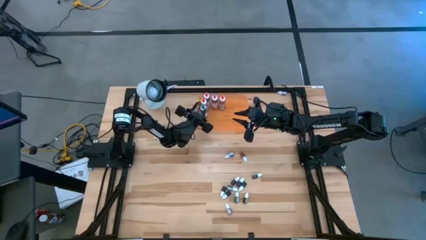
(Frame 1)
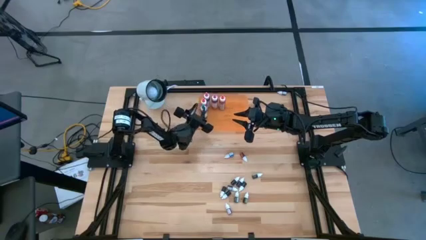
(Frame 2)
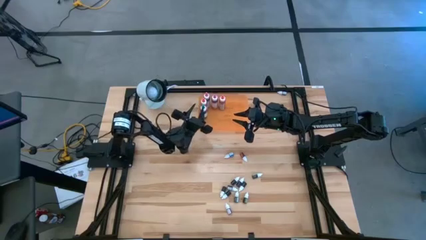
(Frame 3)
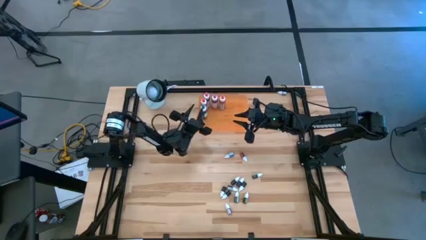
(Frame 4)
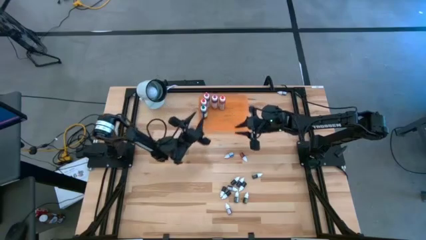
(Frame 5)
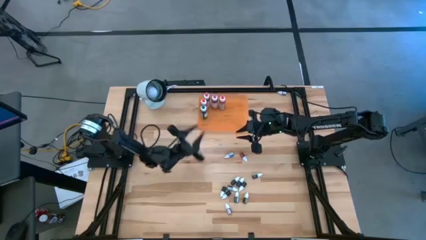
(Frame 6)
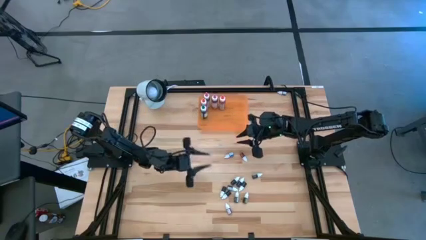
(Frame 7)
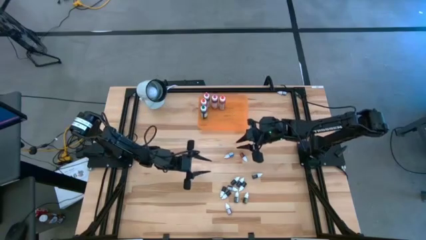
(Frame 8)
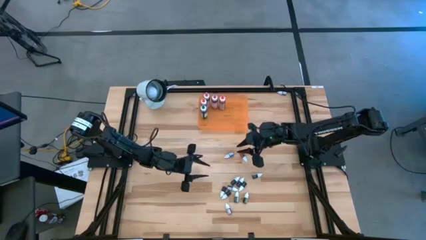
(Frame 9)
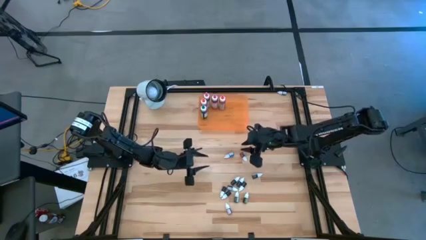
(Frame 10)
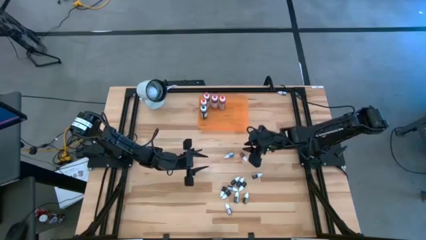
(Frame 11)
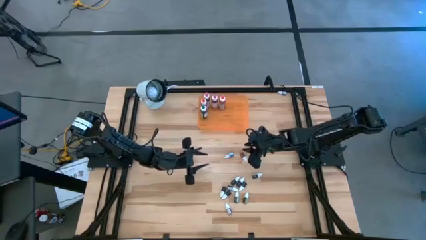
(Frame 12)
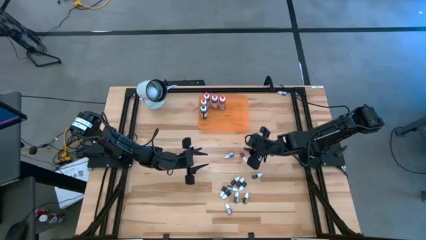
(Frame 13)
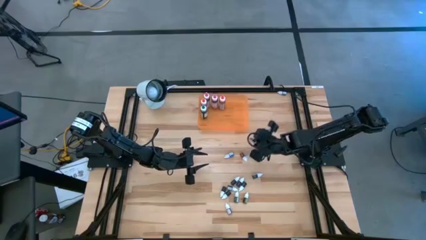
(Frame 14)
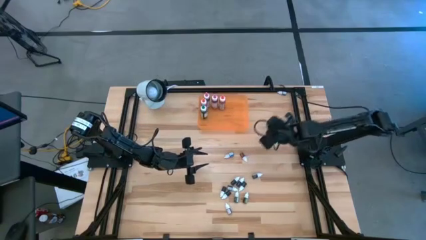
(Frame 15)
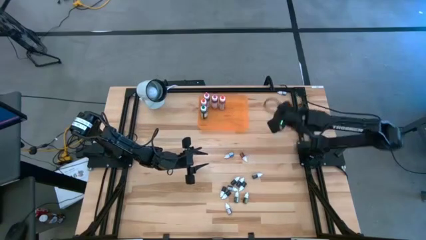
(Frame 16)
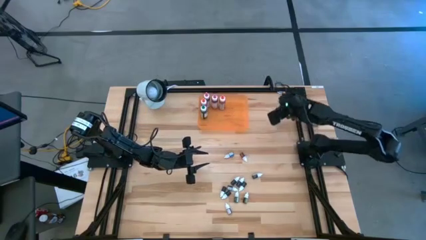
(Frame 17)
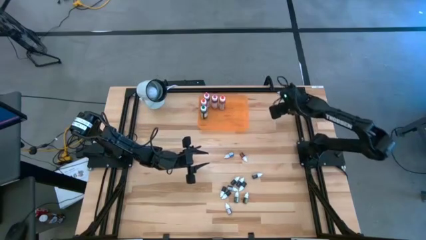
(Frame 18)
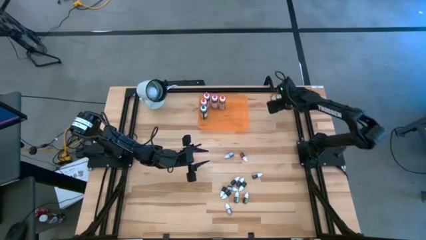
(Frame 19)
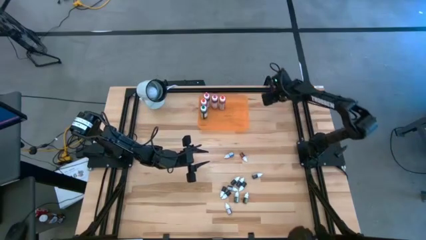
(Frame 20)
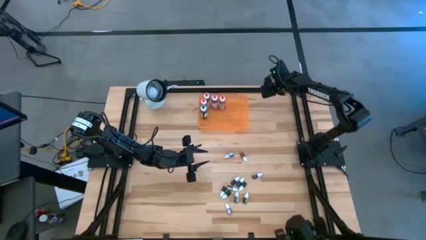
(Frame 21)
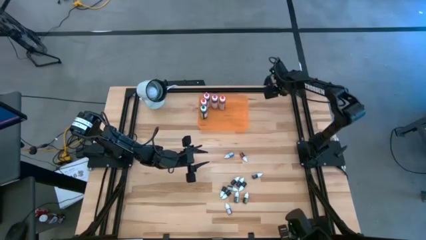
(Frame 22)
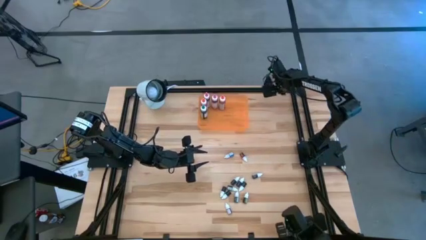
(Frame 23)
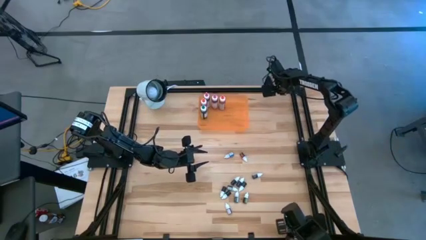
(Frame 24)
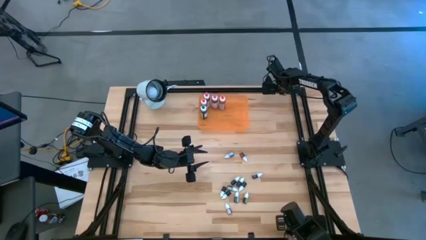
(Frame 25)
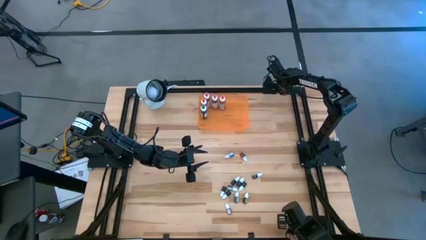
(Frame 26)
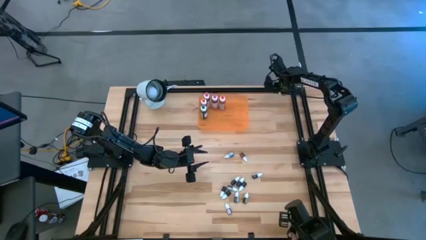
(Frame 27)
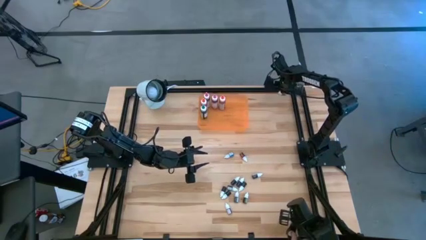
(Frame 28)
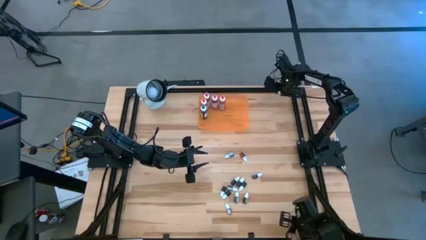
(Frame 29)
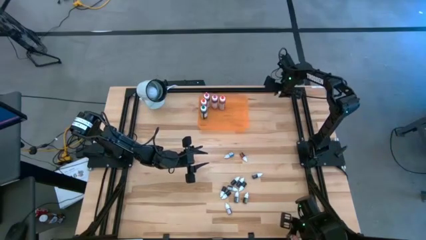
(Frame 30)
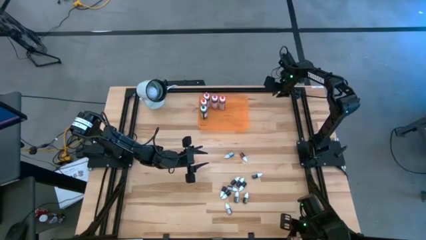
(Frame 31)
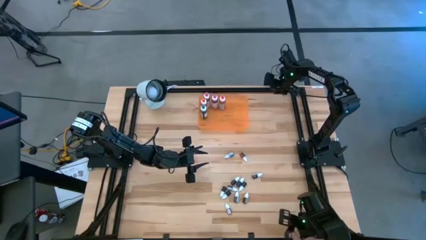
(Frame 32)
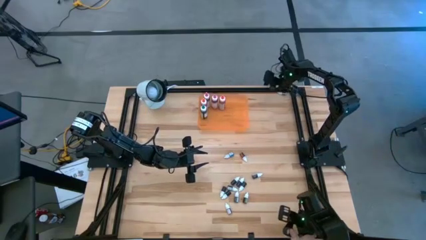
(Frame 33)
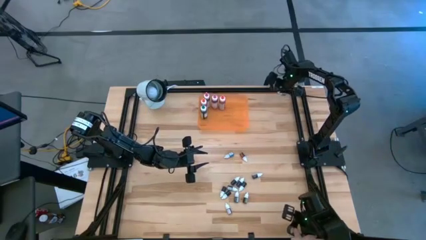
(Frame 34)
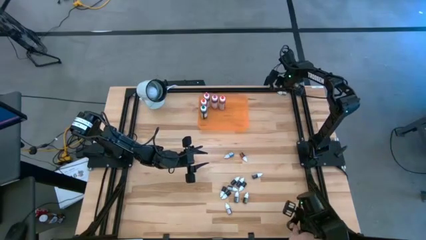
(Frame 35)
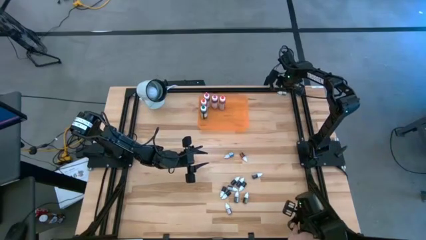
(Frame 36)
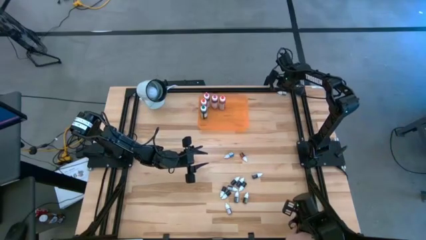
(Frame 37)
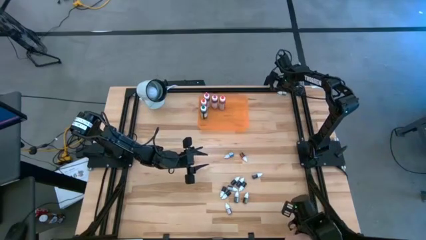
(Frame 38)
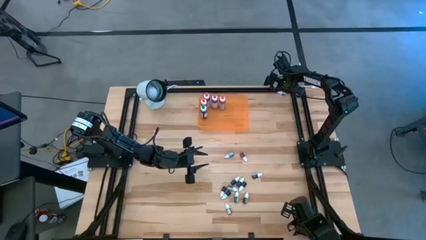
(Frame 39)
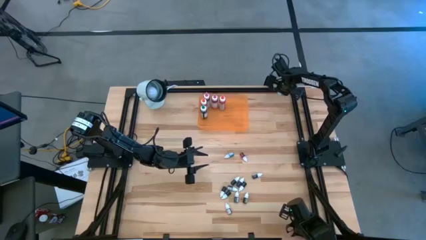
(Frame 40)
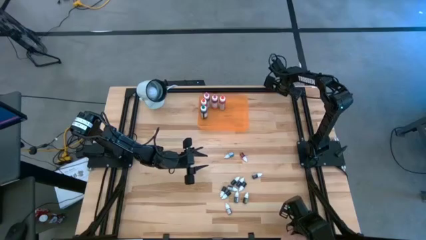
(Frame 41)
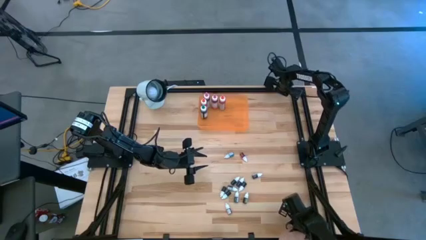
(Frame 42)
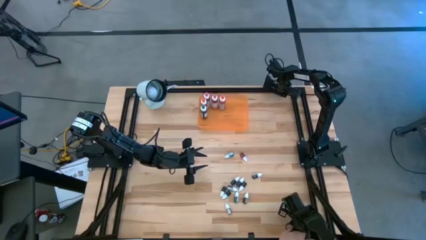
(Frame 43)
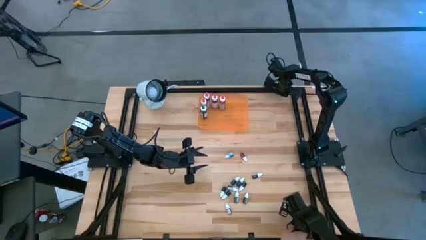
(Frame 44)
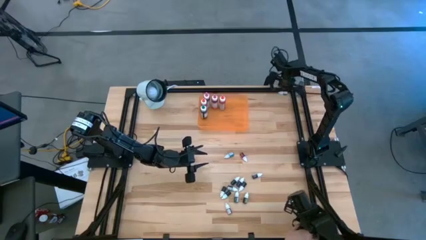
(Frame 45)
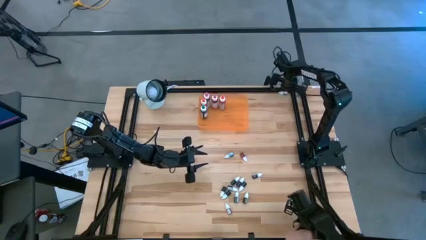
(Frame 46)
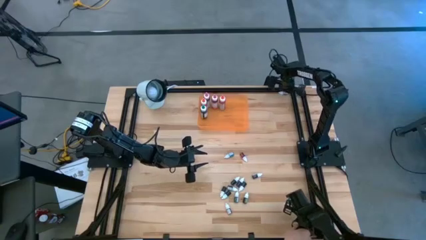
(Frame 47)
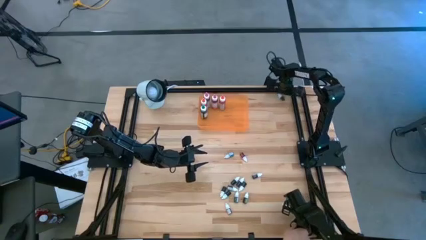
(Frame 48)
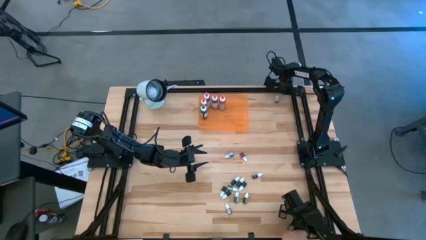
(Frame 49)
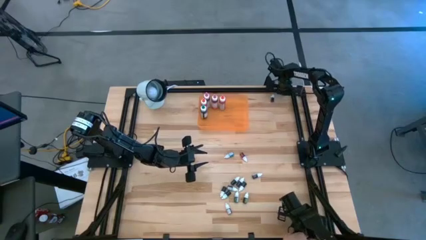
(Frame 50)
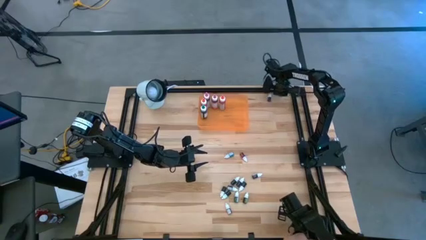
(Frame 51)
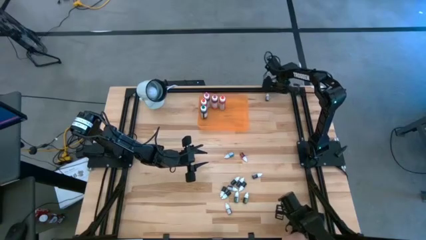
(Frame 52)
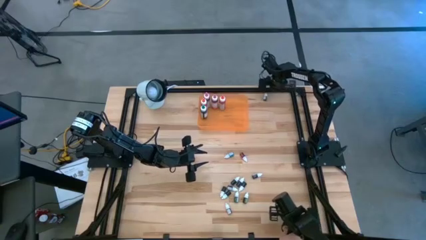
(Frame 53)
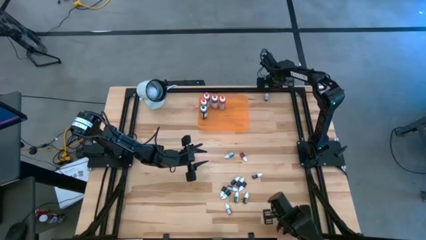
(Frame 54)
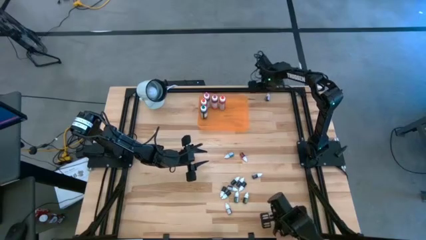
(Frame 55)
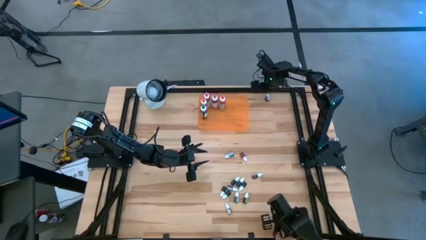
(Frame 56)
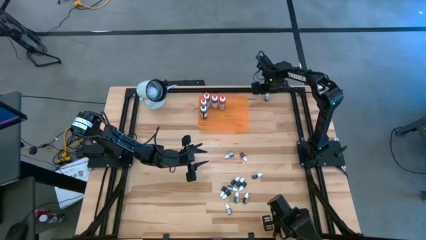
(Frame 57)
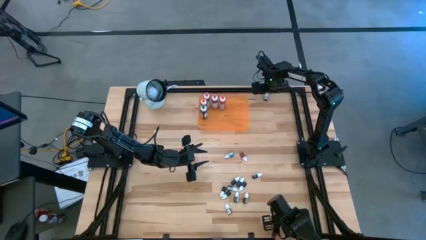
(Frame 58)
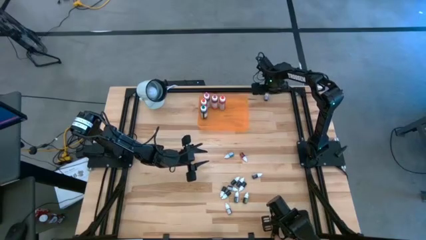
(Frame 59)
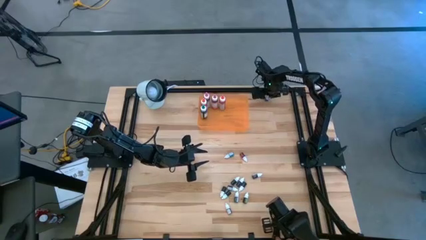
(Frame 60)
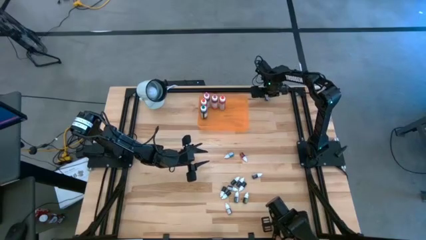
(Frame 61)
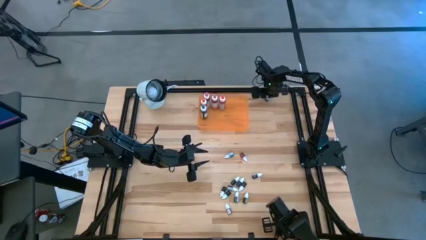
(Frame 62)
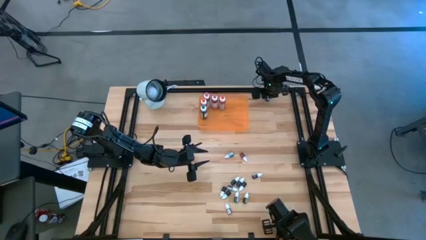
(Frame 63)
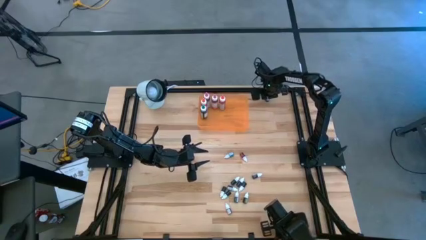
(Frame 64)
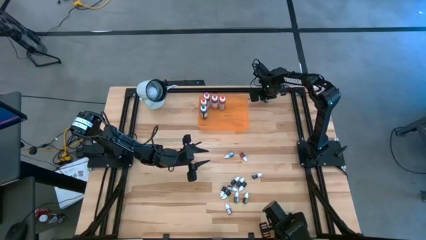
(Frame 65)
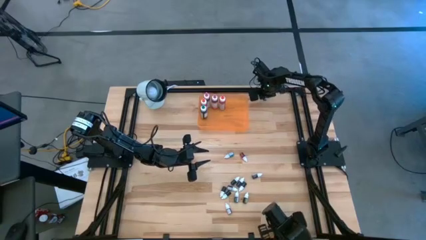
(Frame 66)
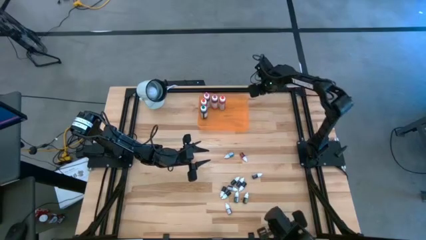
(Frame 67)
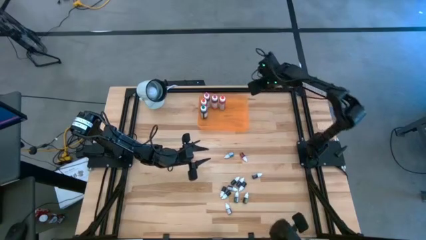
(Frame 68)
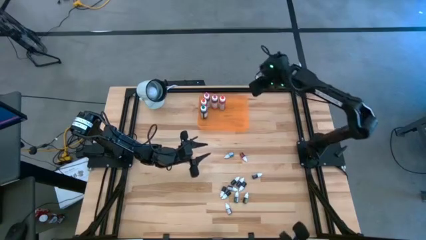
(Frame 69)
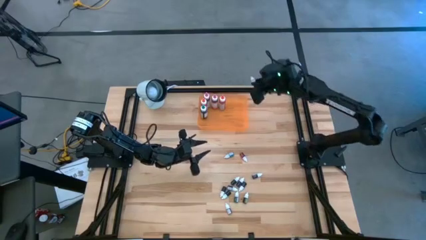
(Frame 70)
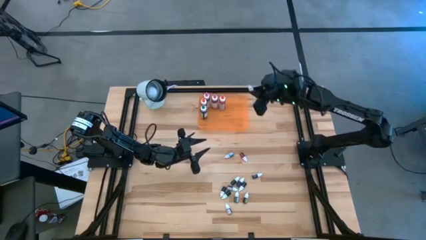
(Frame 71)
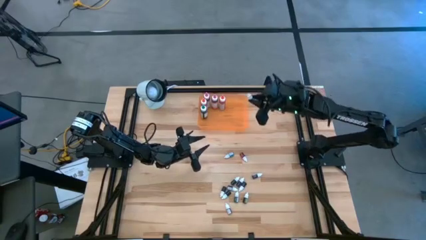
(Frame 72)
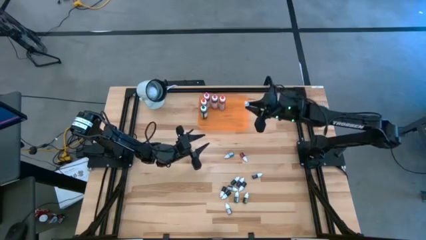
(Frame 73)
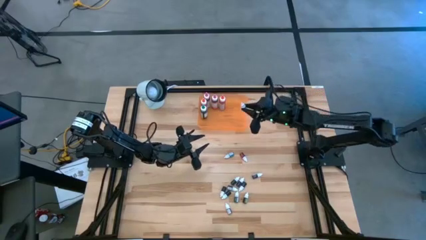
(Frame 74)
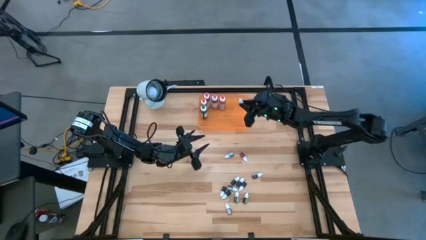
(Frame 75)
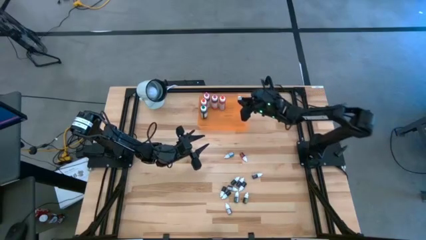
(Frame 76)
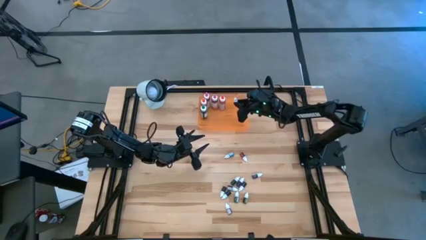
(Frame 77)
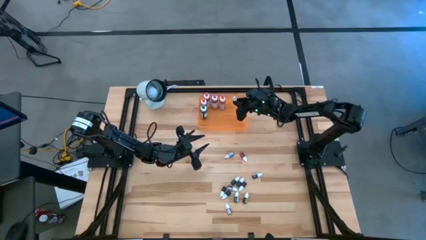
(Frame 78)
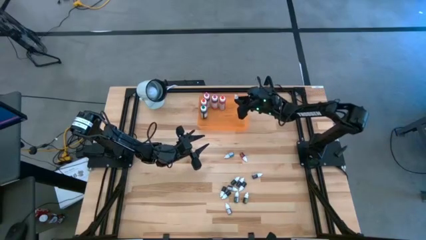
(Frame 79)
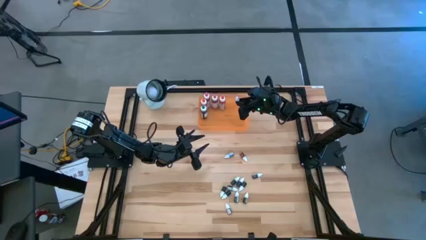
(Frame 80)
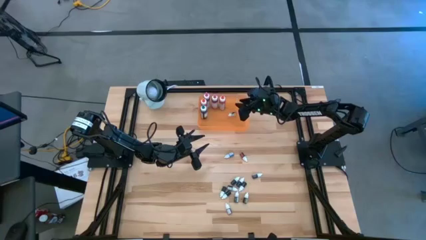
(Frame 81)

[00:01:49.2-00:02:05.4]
Task: Pick & Place food coloring
Put the black small food coloring bottle into the orange bin
